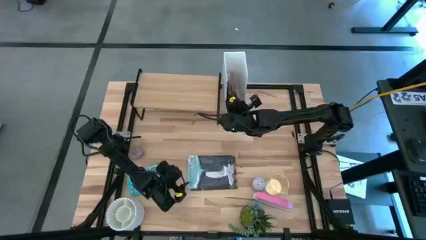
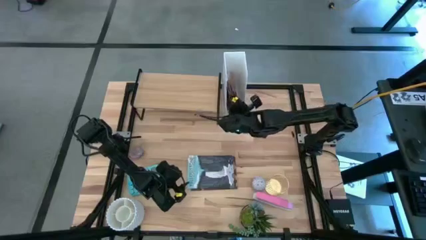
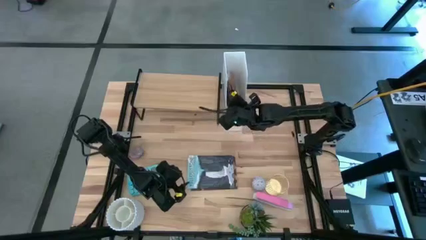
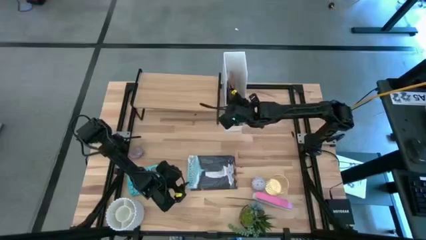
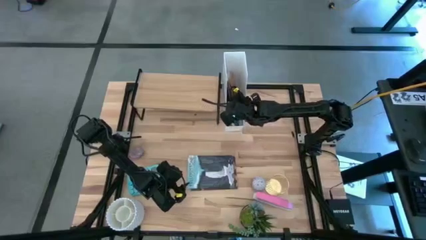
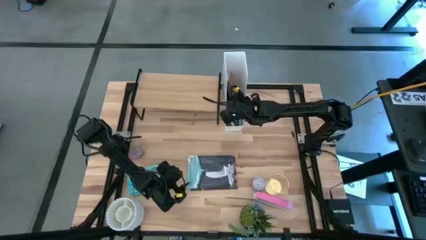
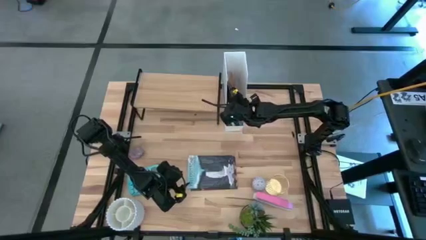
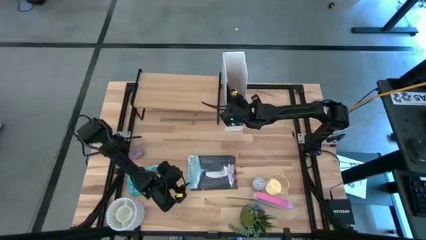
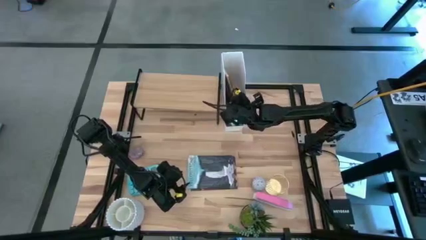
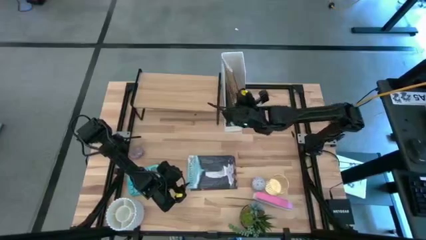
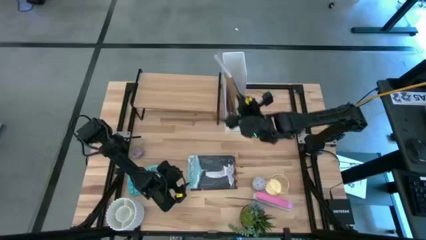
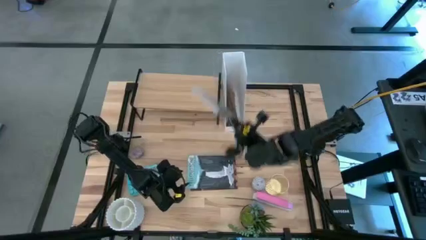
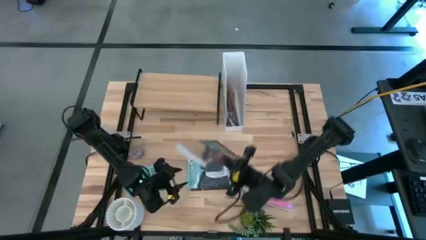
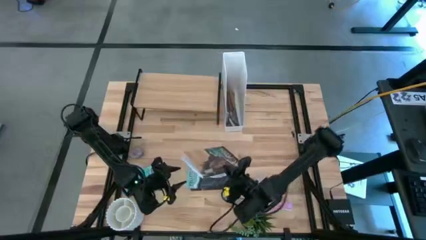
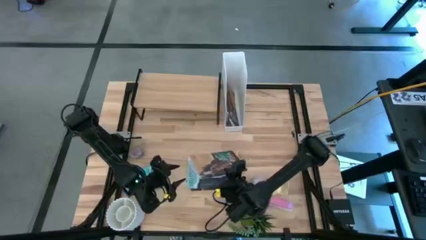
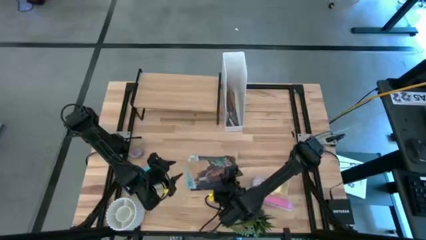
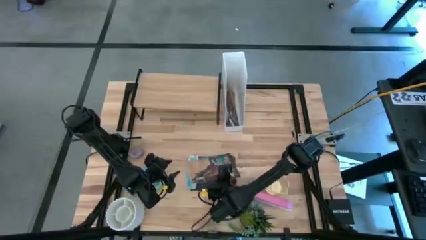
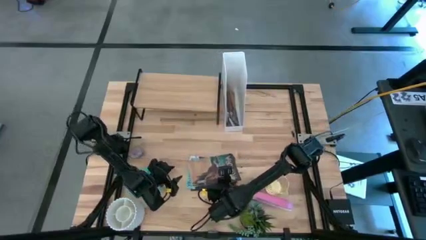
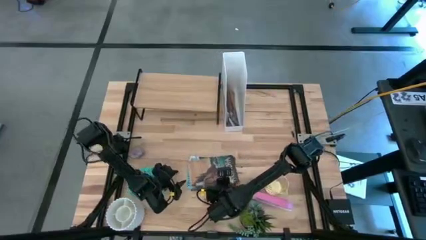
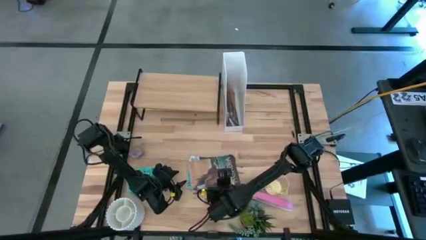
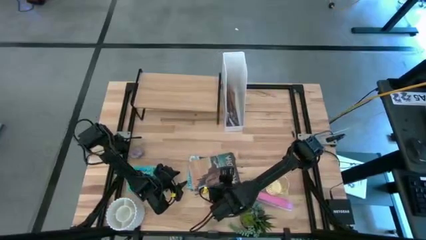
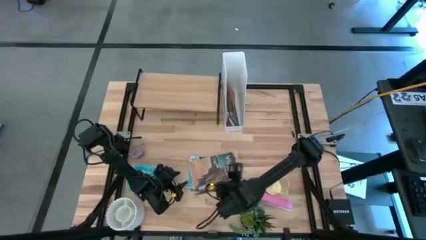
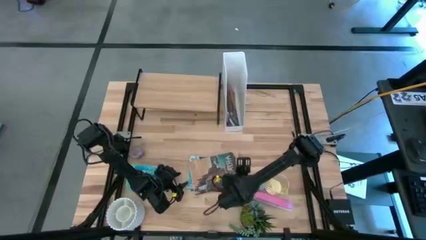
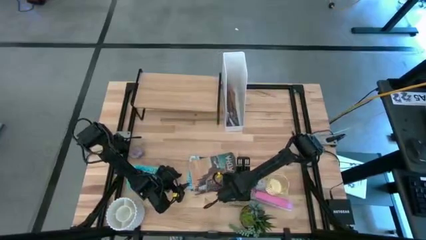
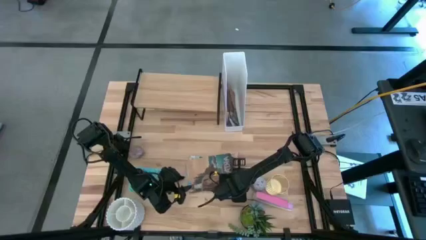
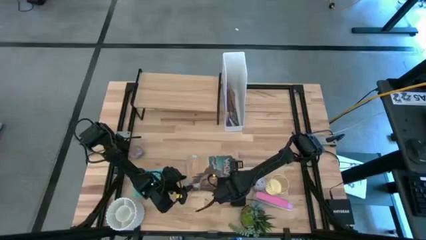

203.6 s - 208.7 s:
Task: Stock shelves
Remove the brown book from the book organizer

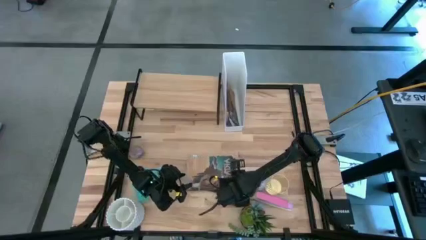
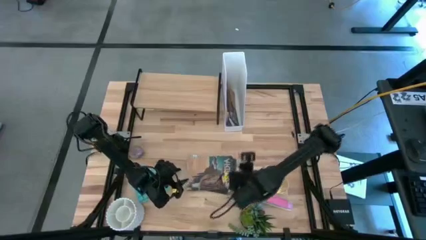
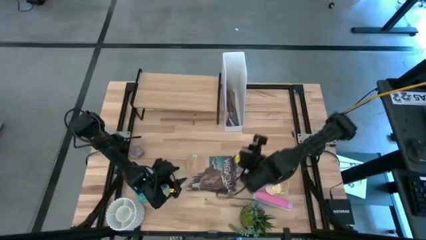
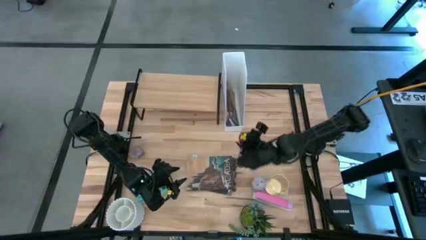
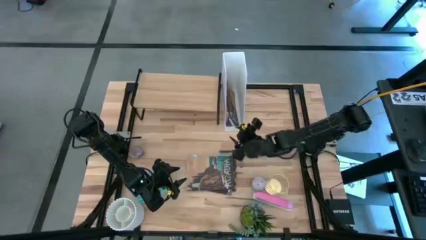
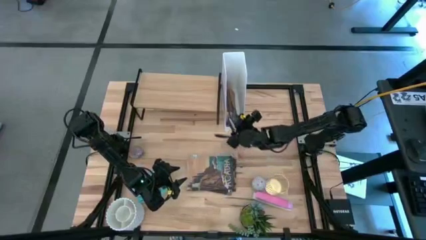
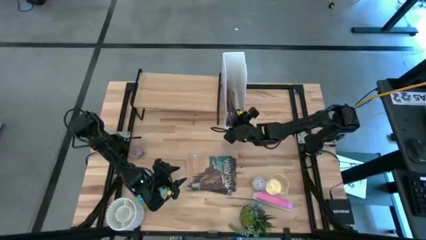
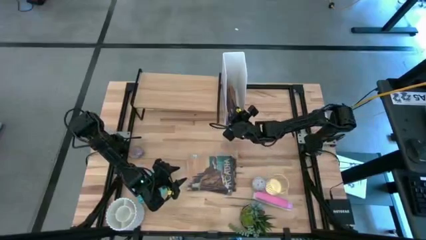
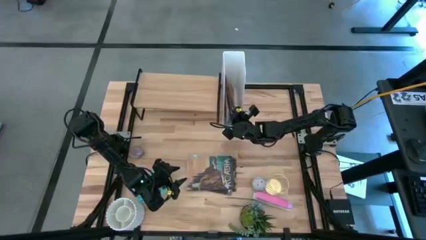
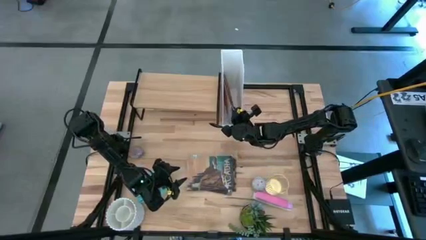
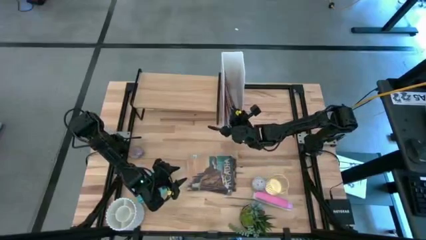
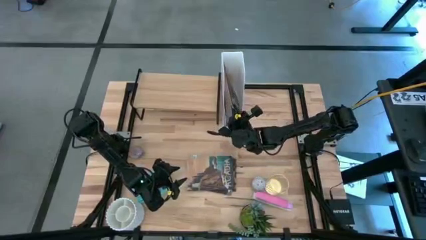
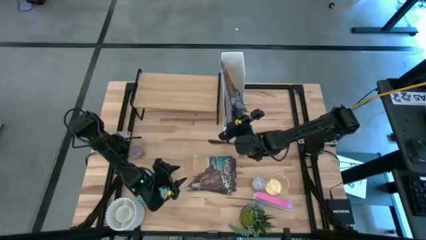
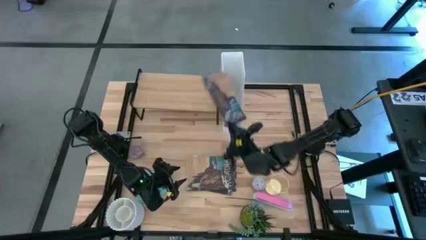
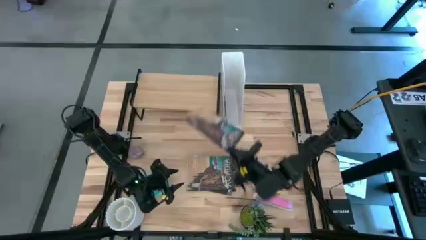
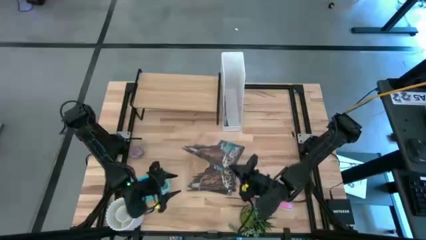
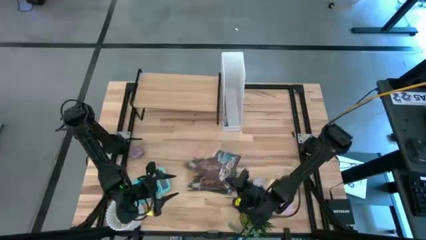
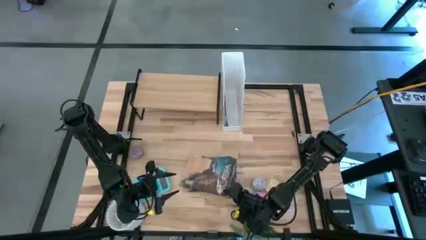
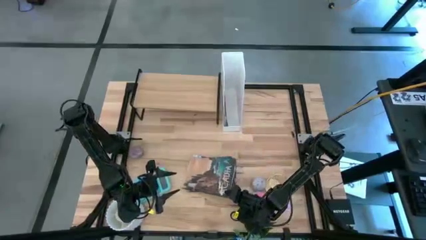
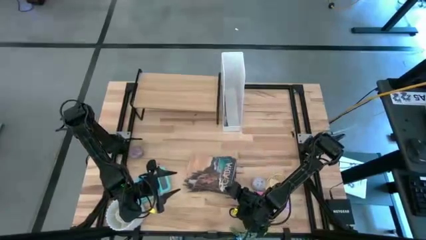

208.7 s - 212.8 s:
Remove the purple book from the book organizer

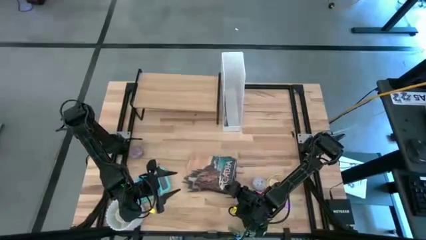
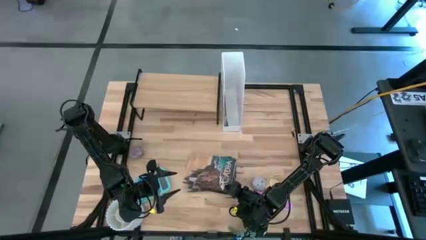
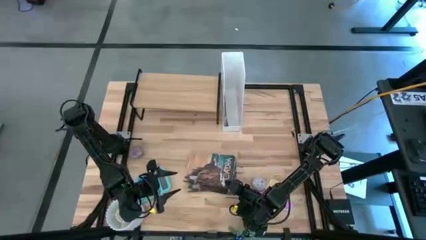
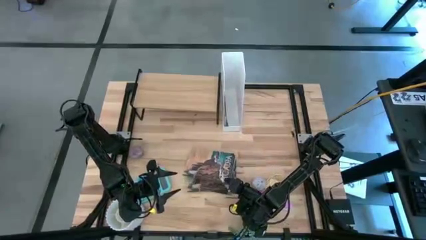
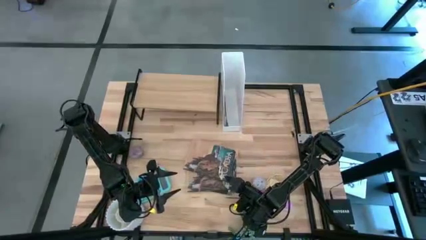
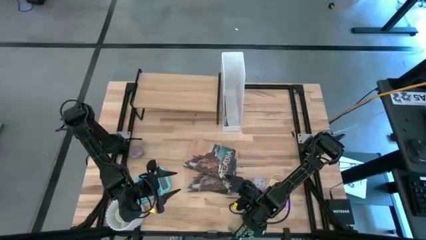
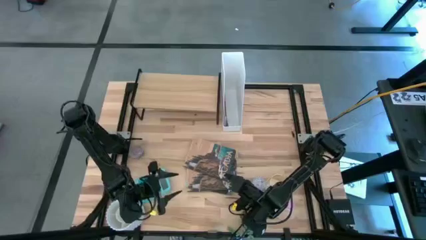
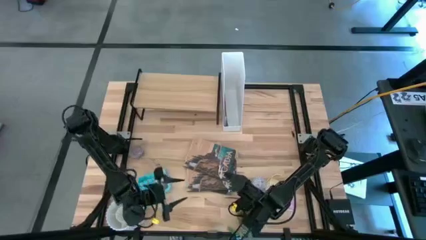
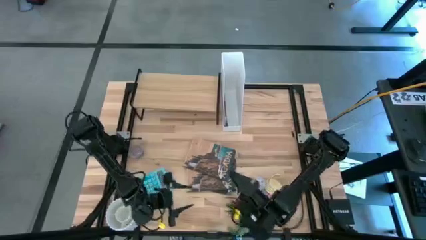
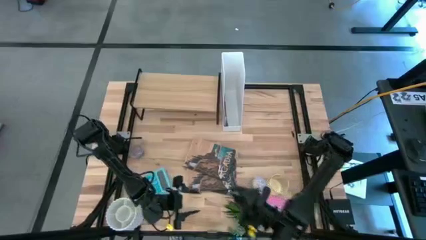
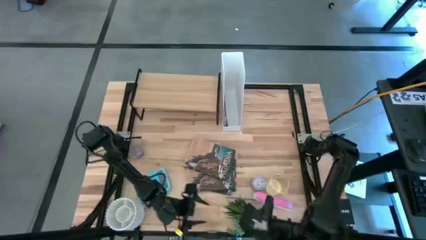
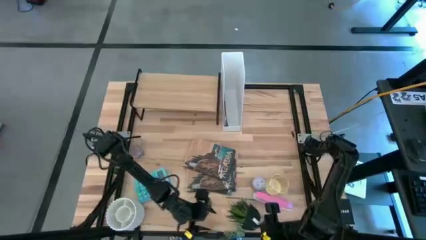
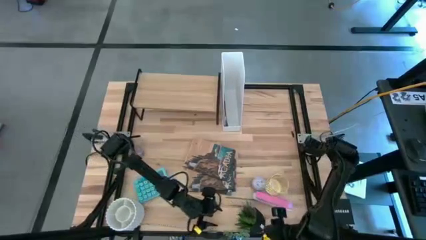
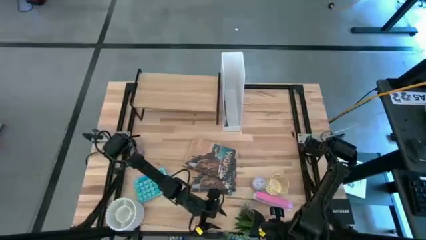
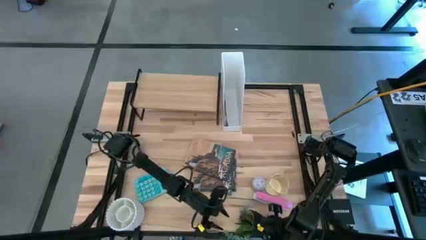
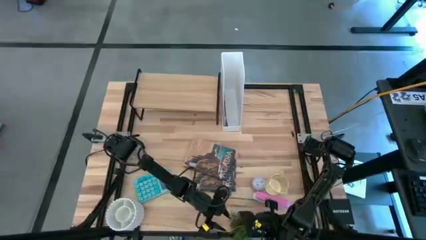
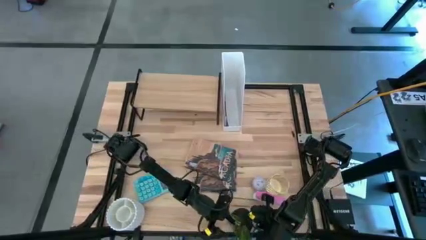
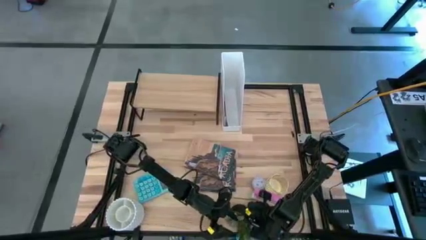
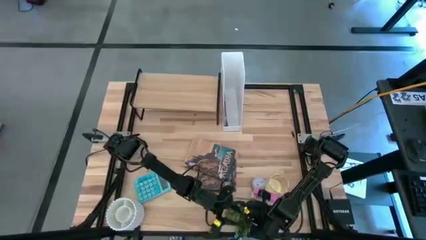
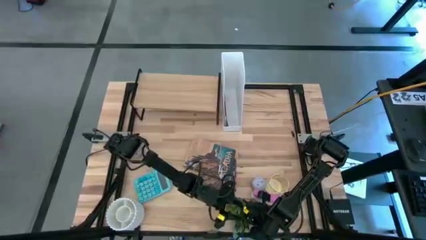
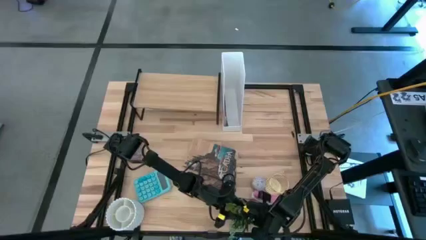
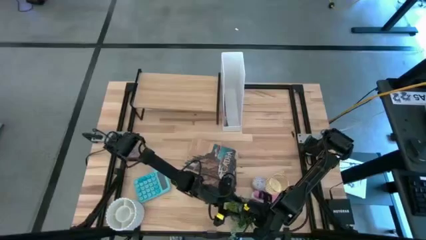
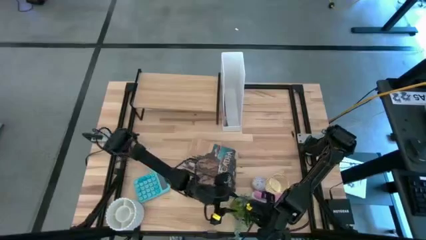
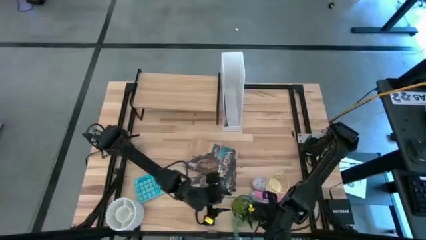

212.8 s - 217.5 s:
Adjust the potted plant

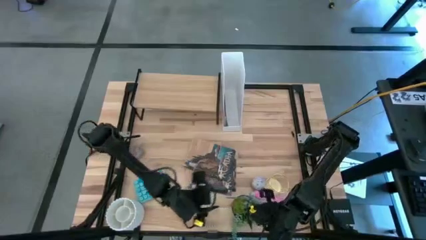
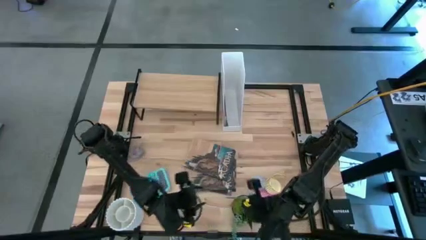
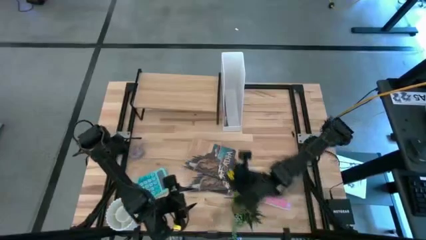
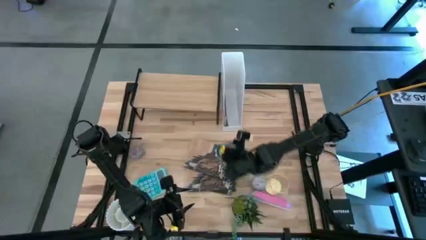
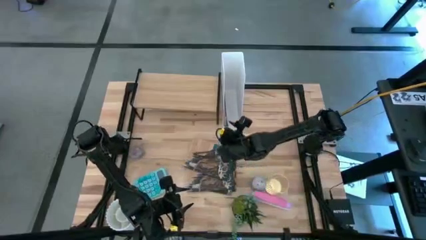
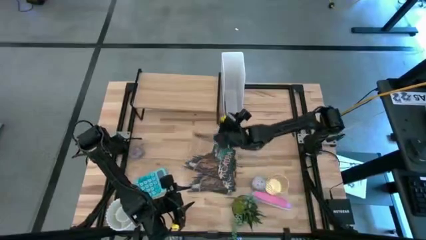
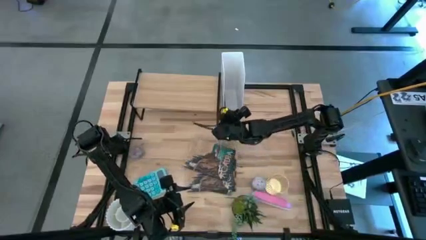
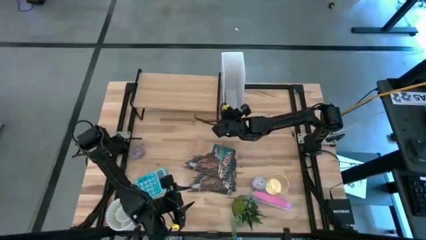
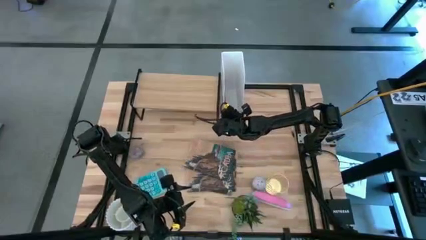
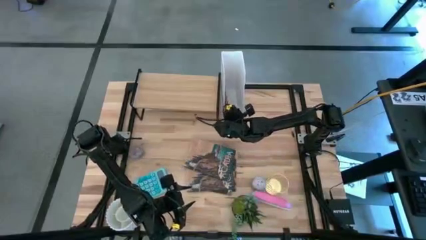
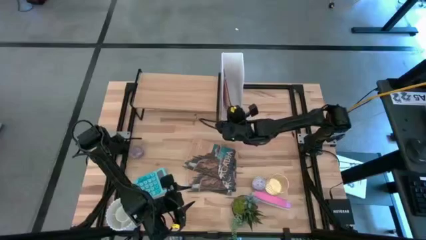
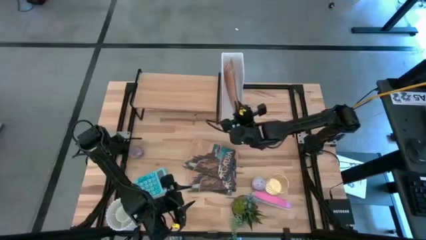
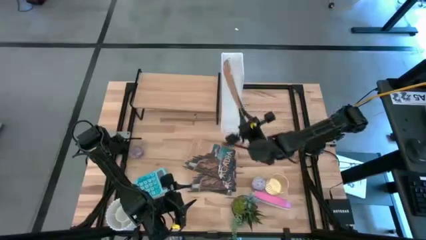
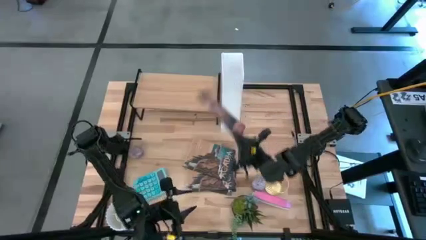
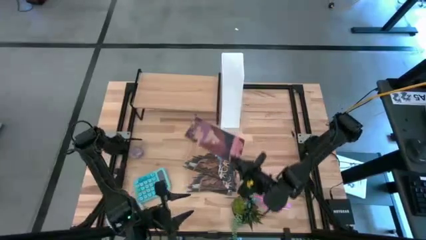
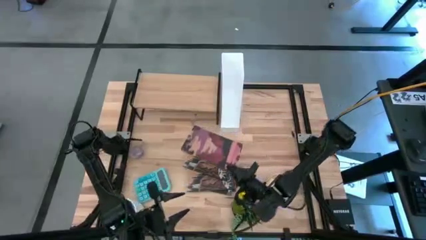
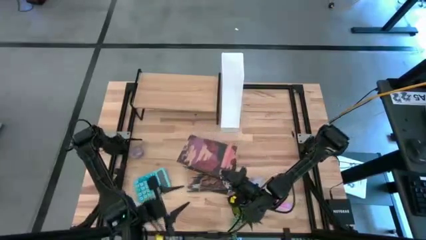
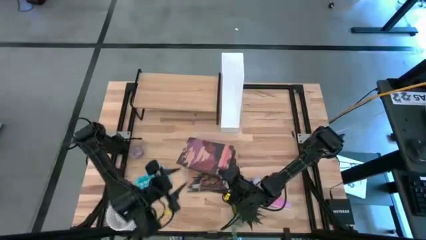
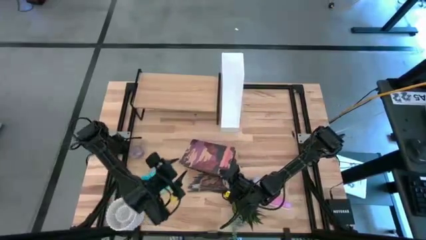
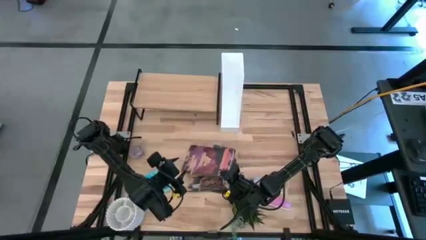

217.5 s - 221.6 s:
Remove the brown book from the book organizer
